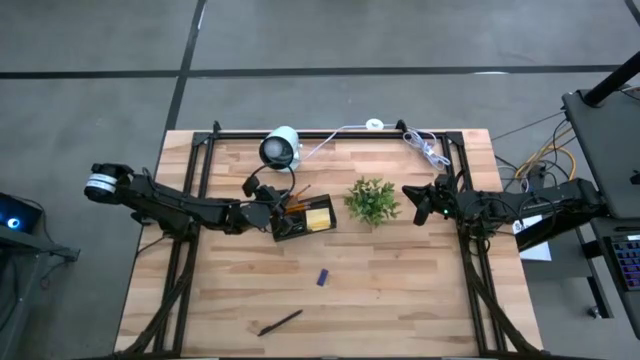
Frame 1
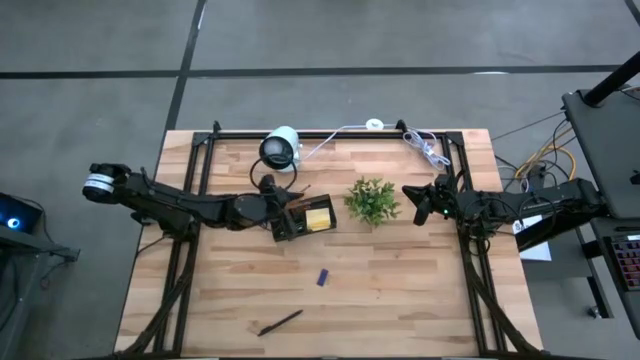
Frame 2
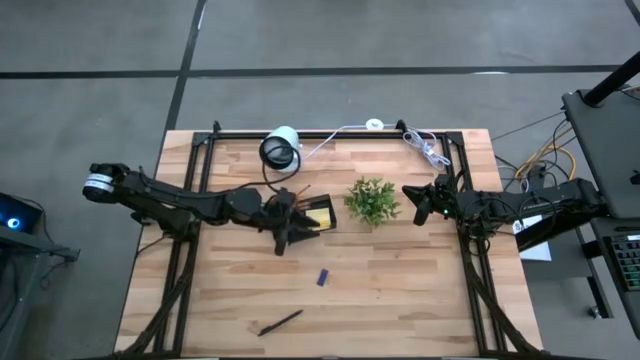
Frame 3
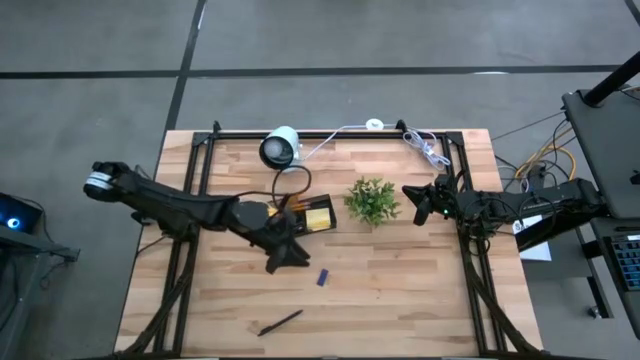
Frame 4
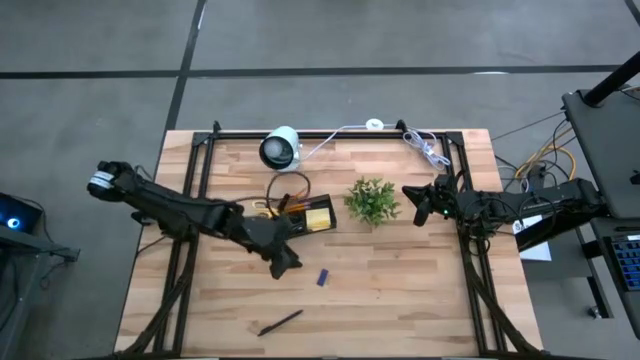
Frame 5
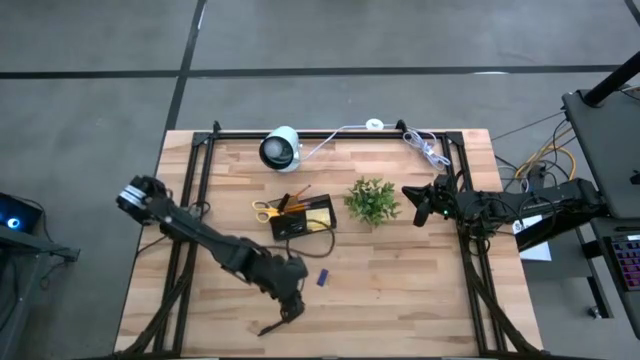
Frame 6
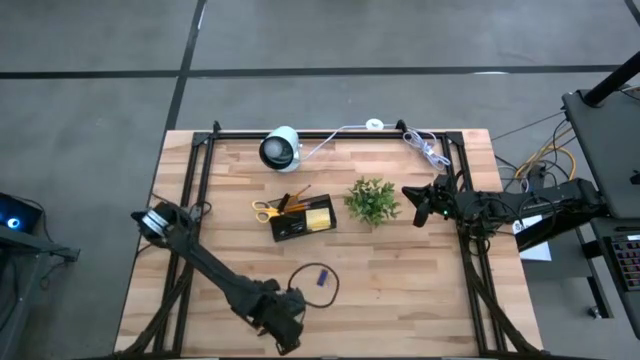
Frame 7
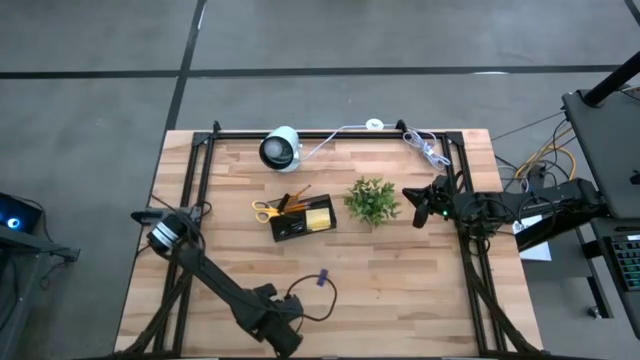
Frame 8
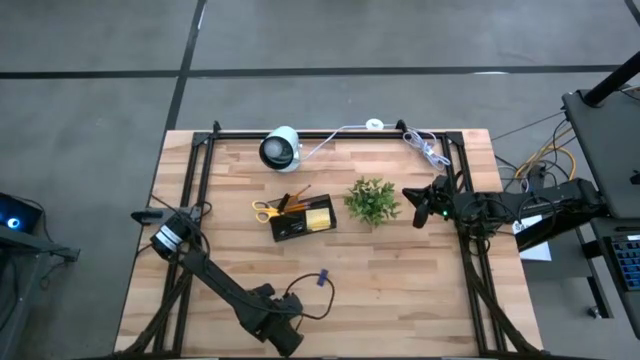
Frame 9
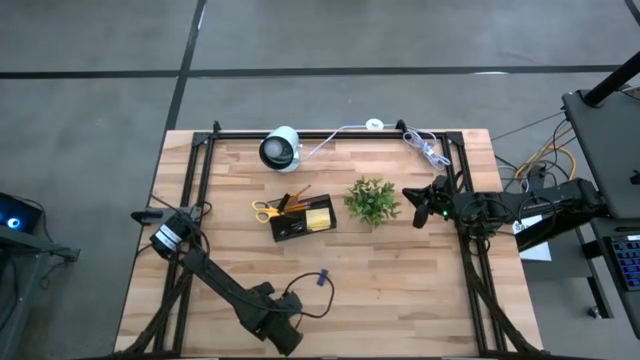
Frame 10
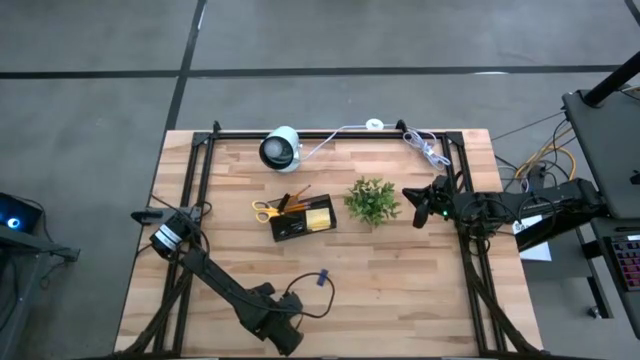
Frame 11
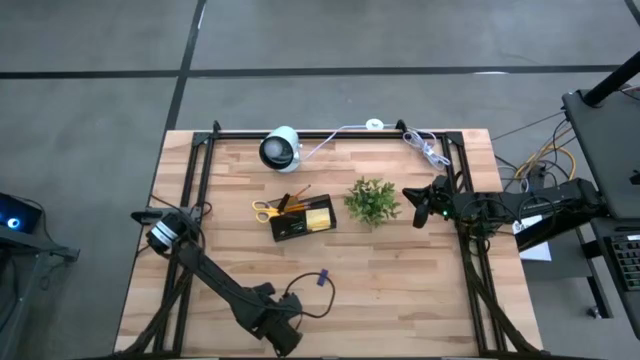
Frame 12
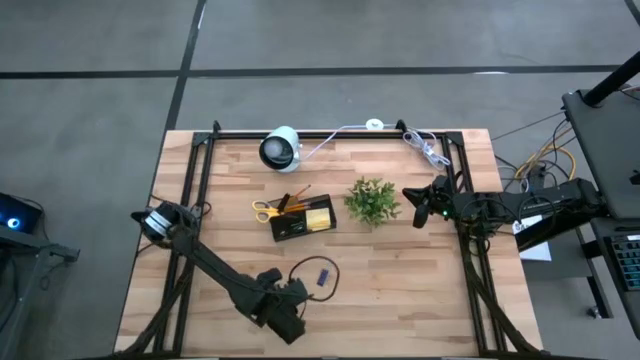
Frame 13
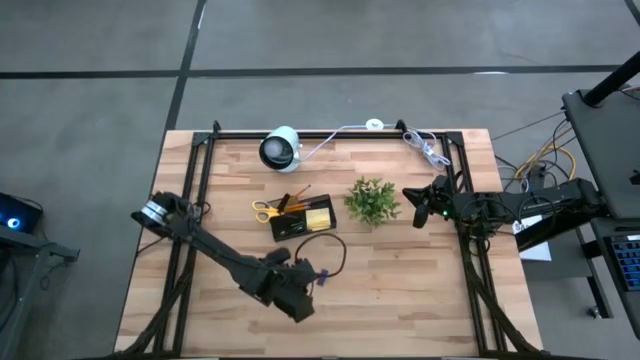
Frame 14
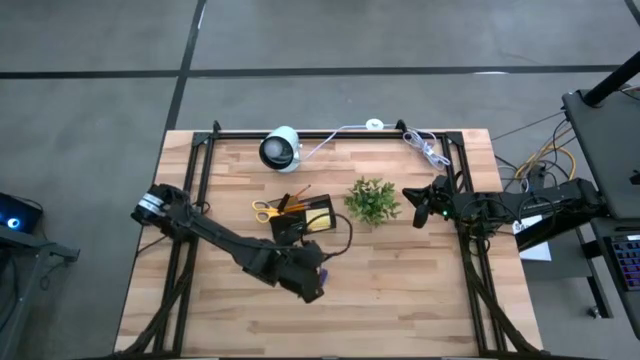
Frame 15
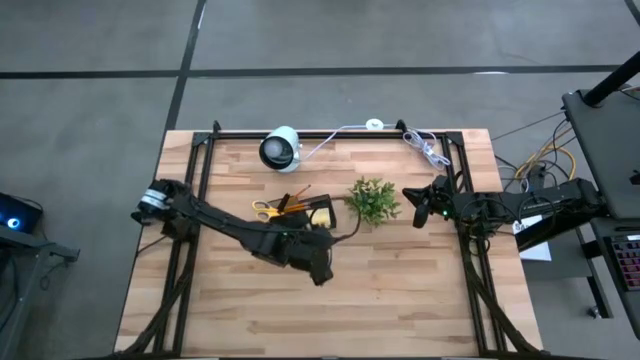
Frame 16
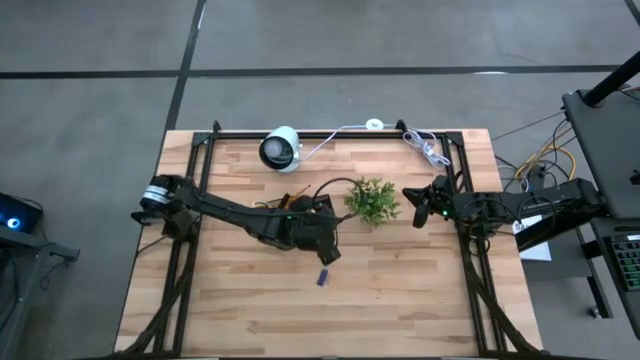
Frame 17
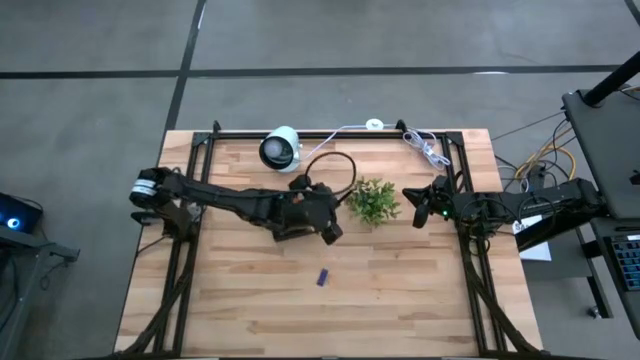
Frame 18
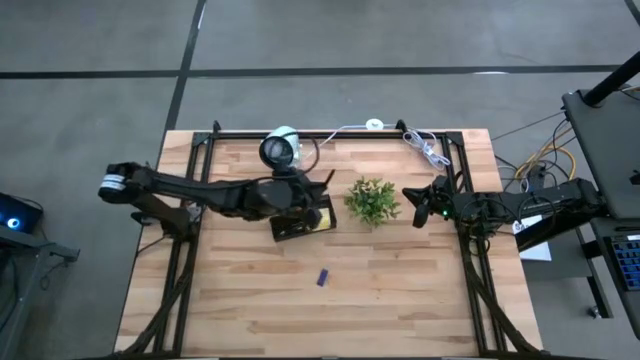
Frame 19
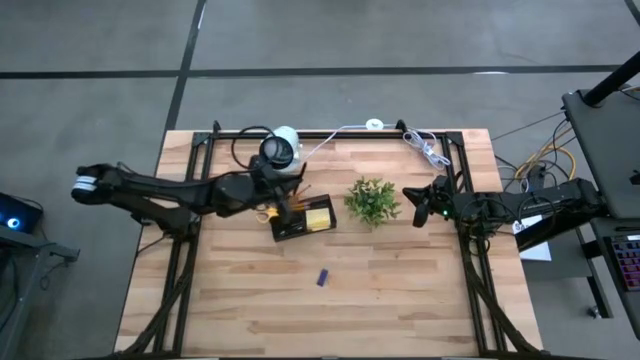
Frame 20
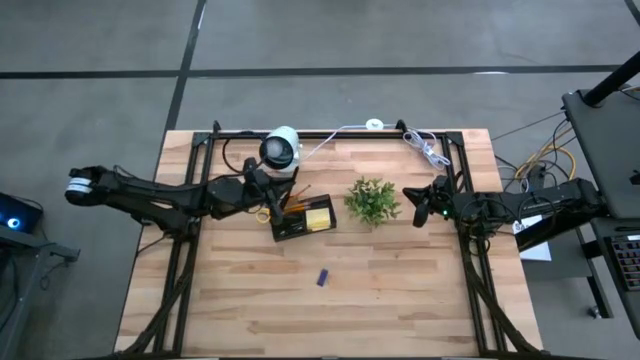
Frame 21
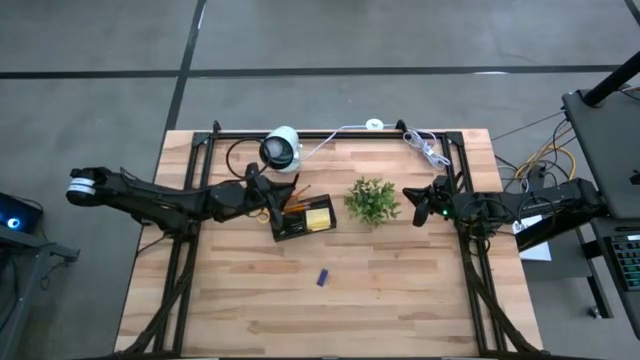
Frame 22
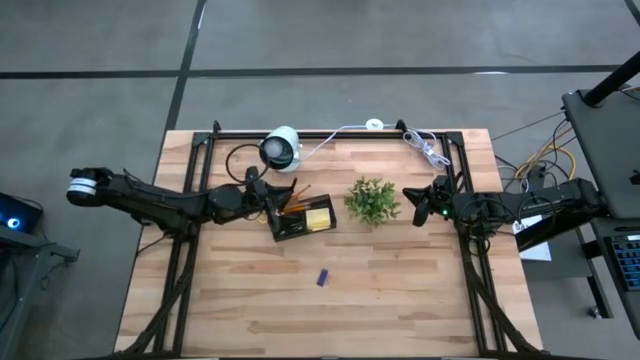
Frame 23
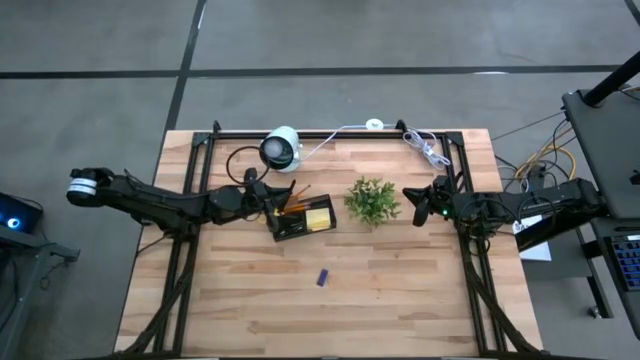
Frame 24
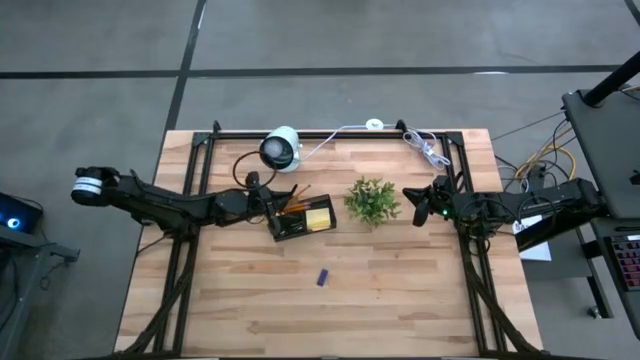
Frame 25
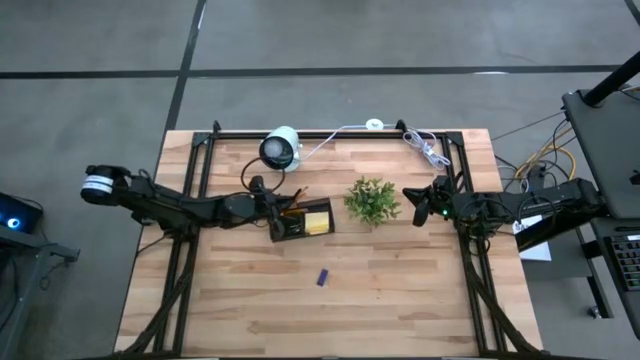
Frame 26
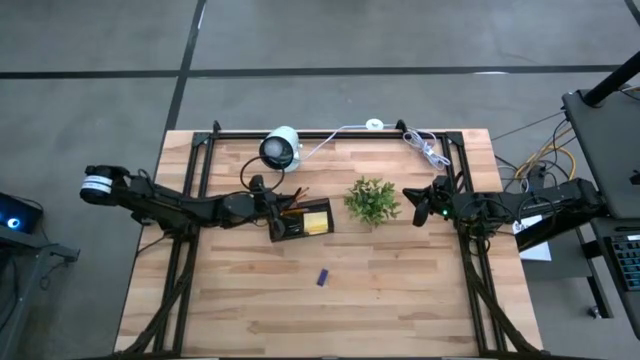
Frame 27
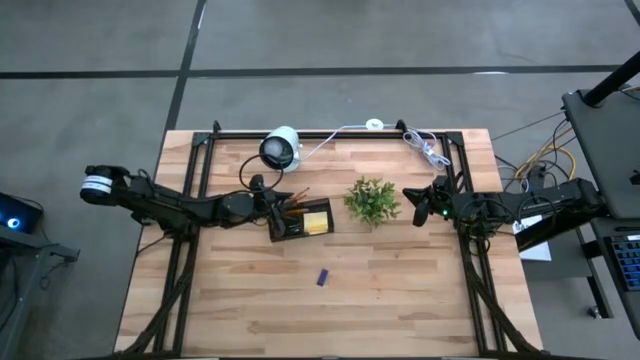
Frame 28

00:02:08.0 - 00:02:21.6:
Task: Pick and place office supplies into organizer
Put the black pen in the black desk organizer

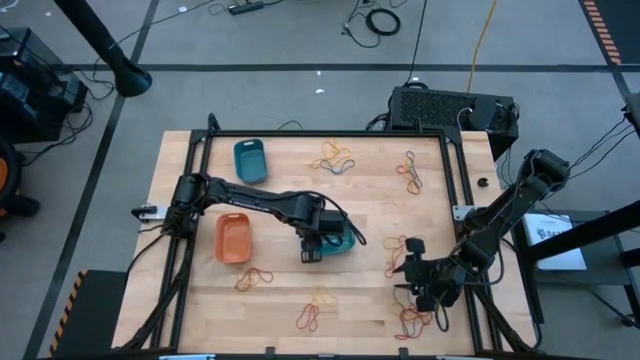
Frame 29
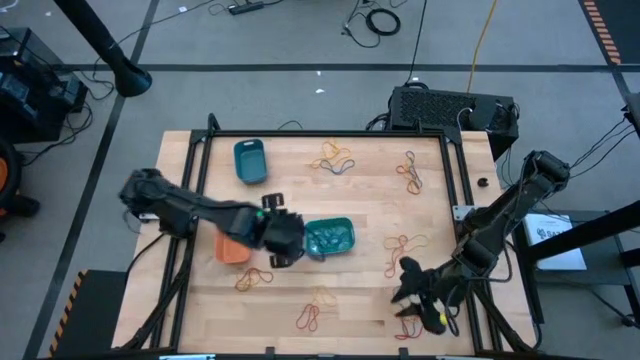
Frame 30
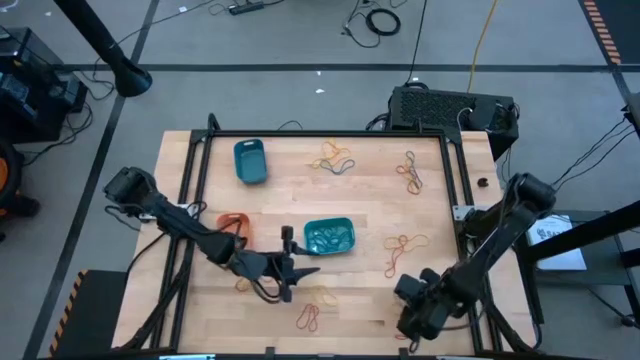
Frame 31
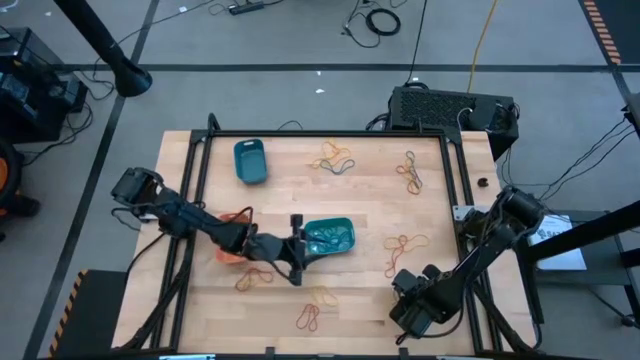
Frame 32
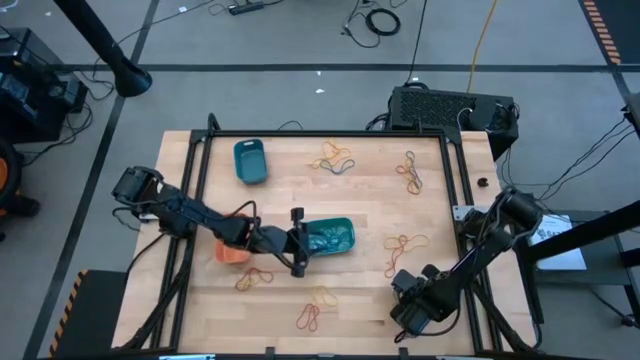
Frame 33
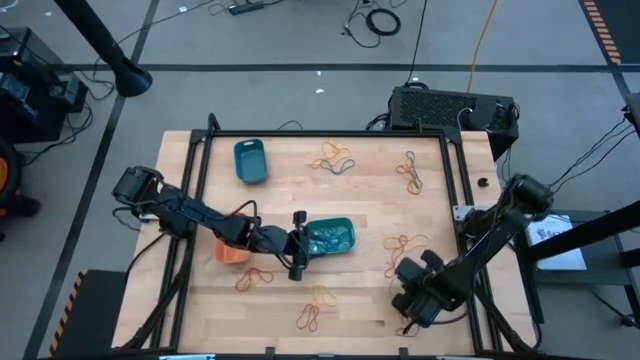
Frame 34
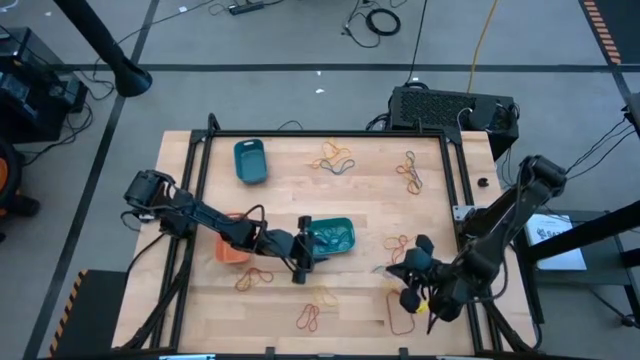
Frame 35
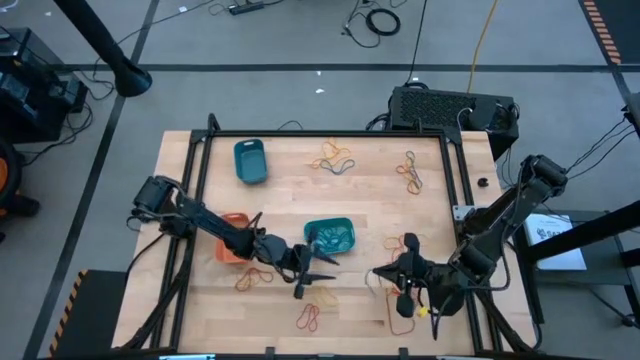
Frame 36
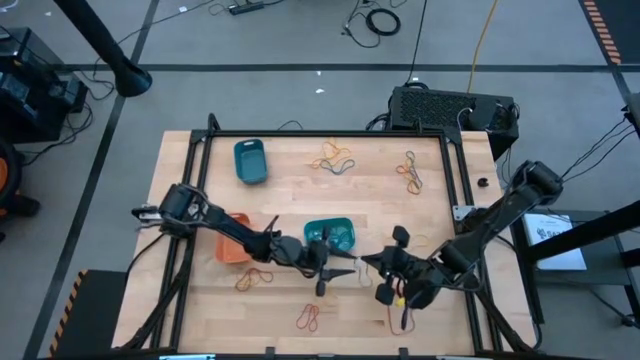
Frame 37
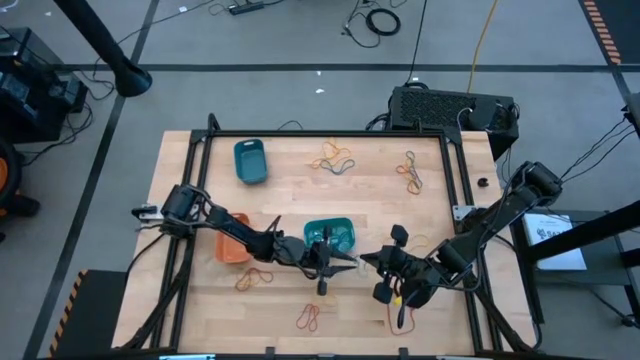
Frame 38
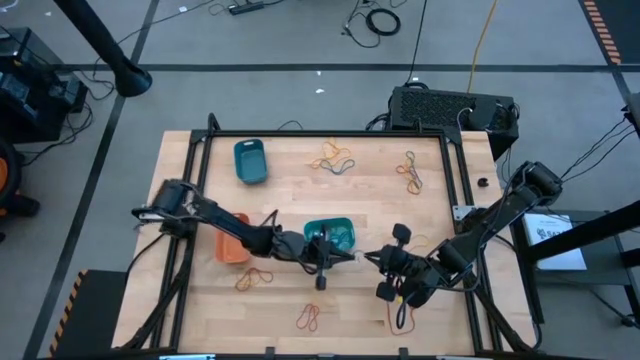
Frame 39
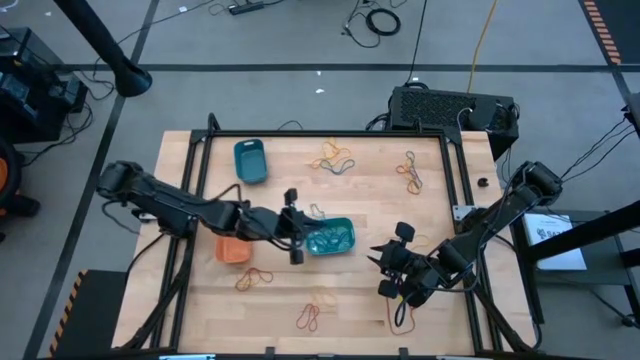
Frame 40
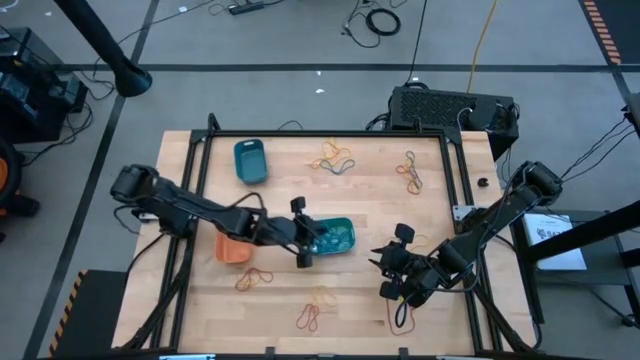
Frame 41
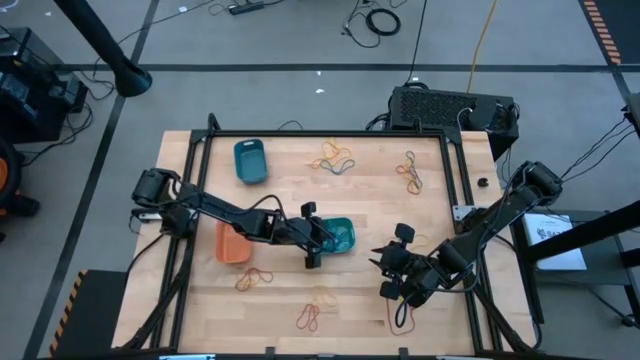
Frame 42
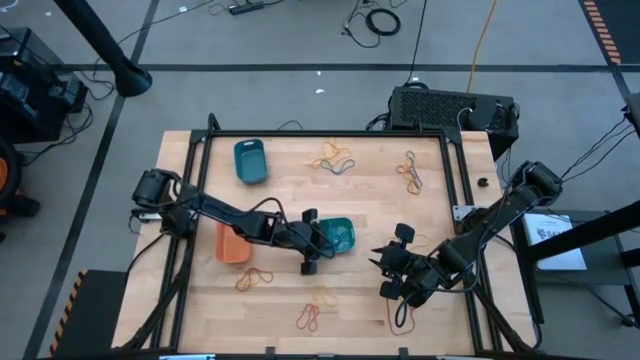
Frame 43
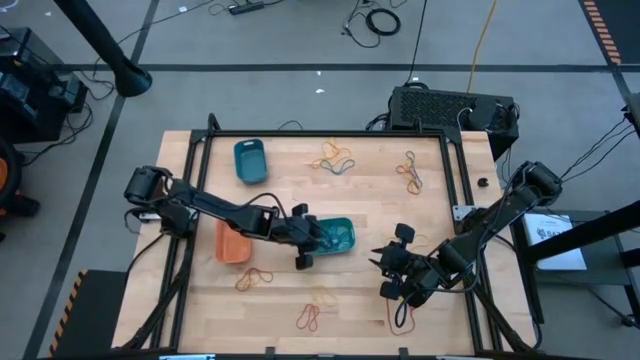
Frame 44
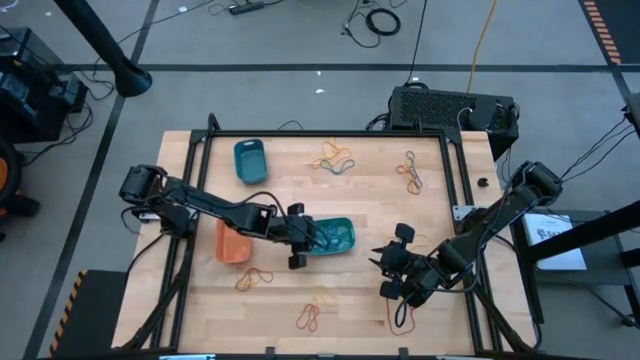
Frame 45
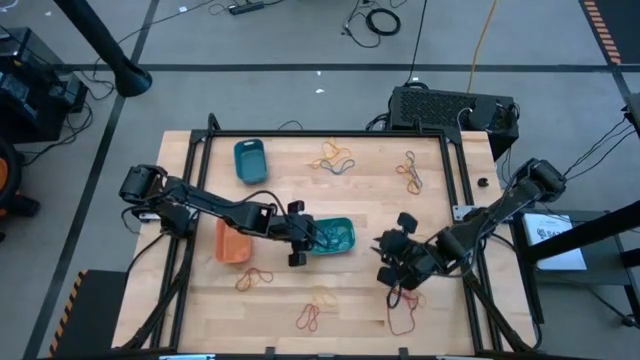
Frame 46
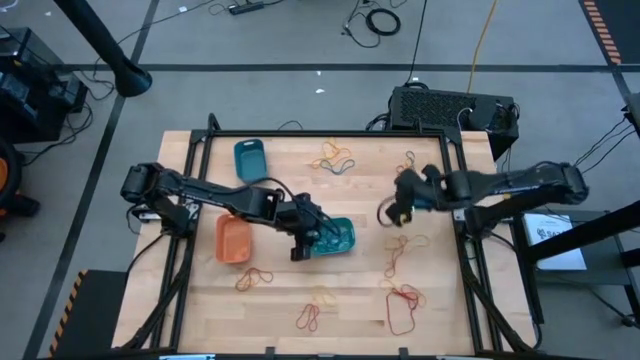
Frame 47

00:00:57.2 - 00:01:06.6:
Task: Sort rubber bands into baskets
Put the blue rubber band into the green bin
